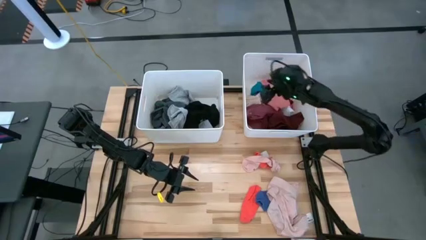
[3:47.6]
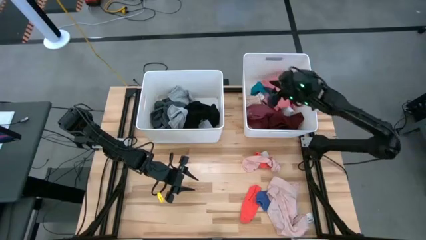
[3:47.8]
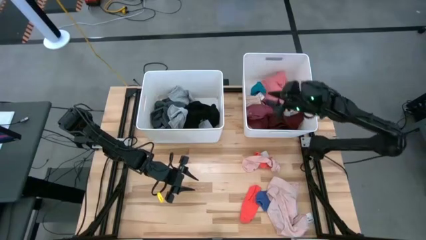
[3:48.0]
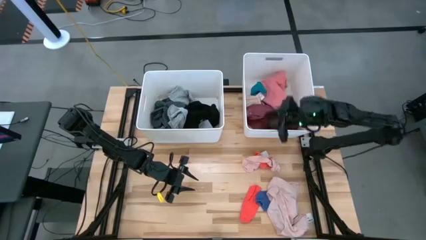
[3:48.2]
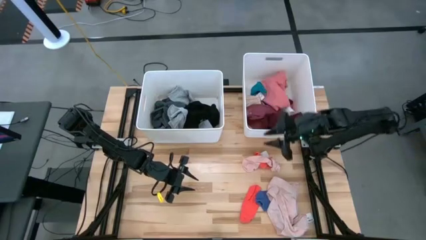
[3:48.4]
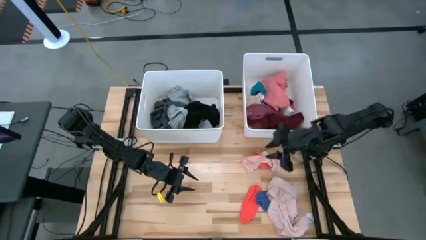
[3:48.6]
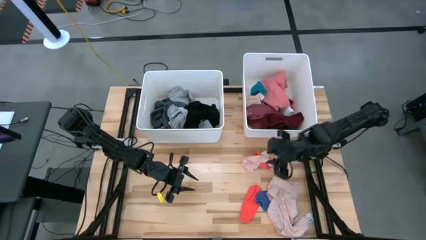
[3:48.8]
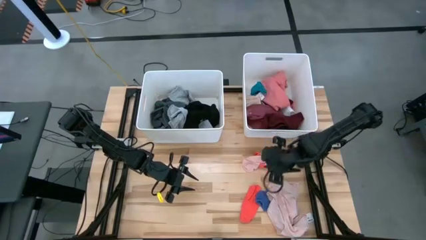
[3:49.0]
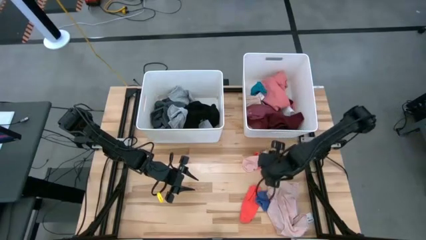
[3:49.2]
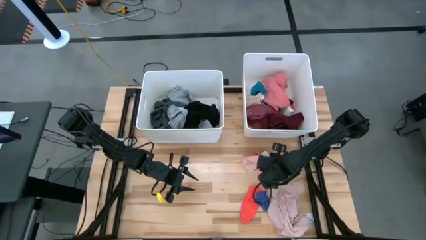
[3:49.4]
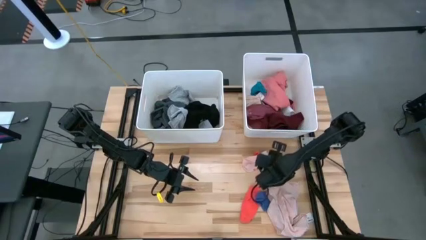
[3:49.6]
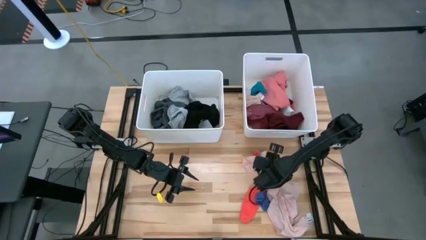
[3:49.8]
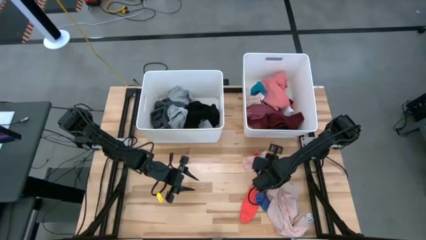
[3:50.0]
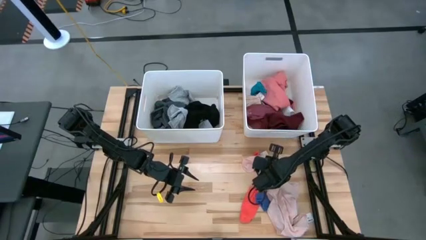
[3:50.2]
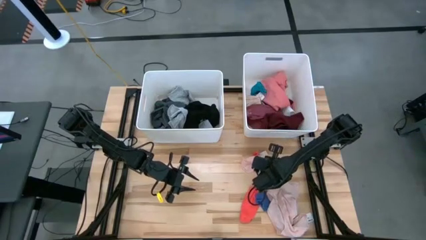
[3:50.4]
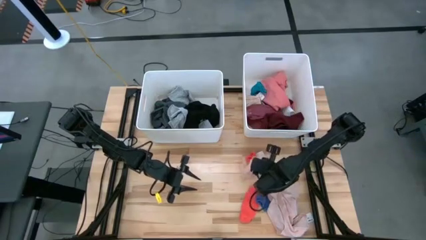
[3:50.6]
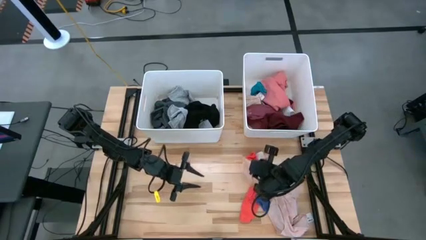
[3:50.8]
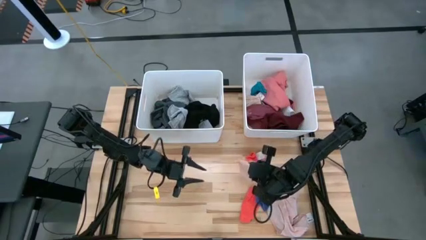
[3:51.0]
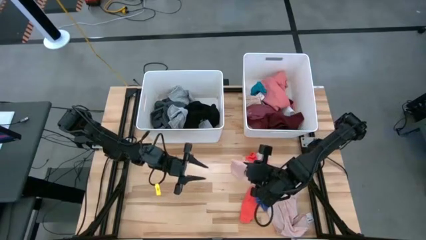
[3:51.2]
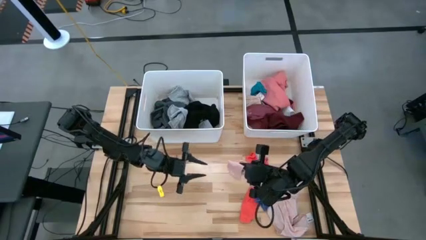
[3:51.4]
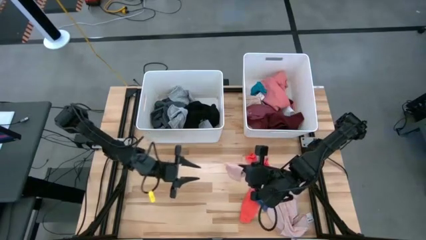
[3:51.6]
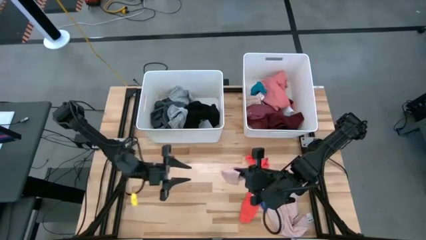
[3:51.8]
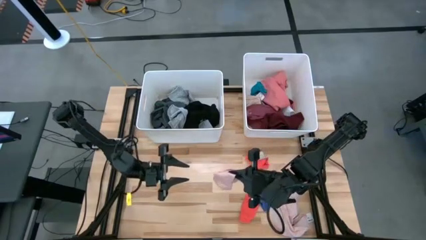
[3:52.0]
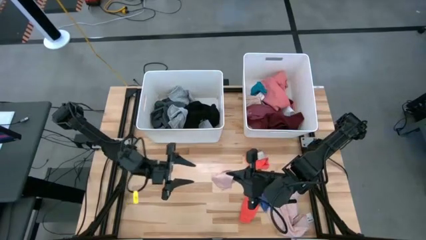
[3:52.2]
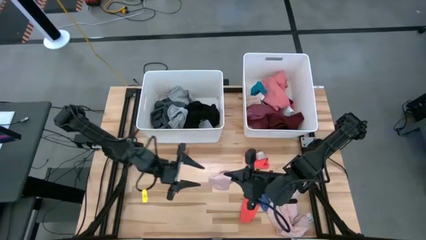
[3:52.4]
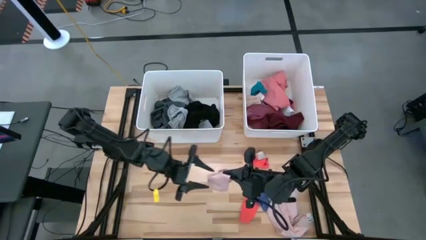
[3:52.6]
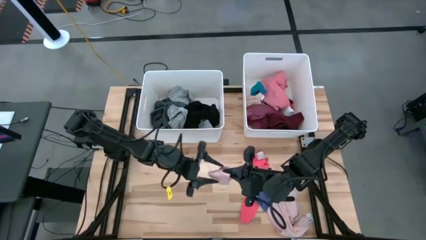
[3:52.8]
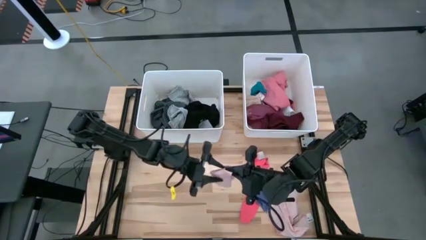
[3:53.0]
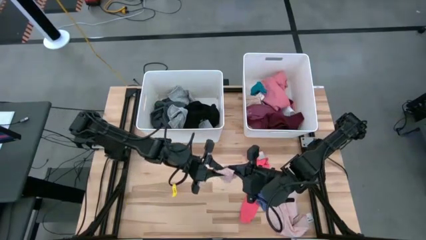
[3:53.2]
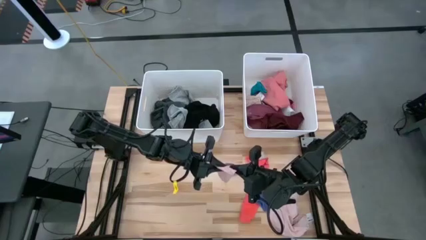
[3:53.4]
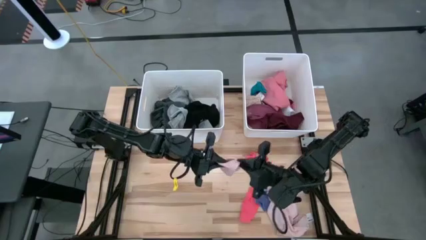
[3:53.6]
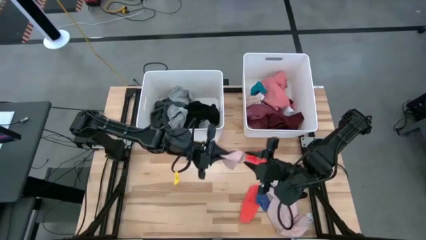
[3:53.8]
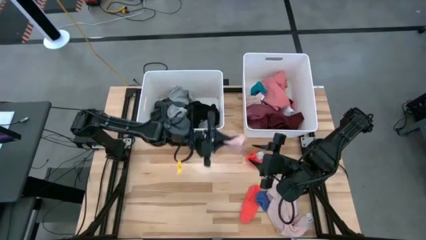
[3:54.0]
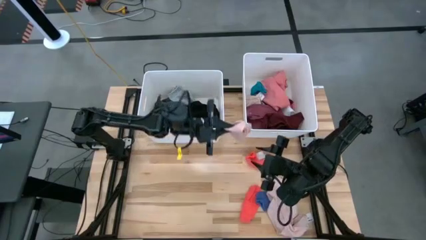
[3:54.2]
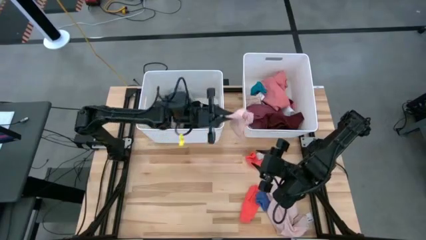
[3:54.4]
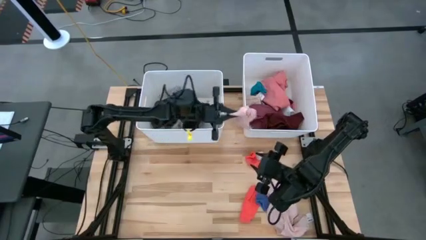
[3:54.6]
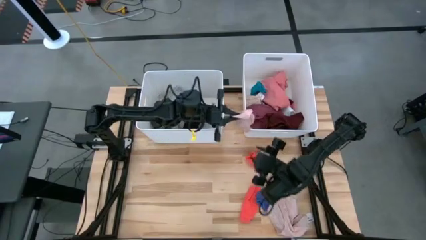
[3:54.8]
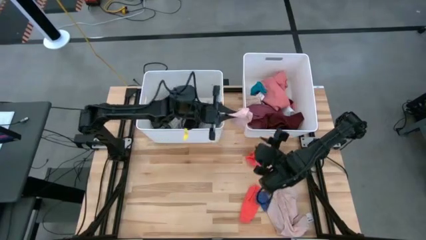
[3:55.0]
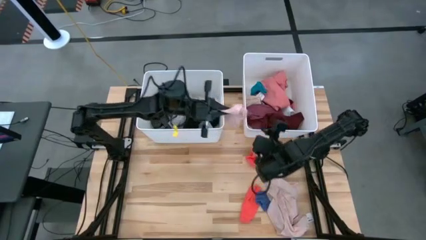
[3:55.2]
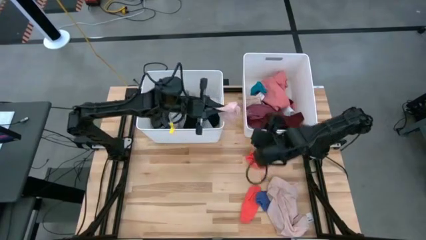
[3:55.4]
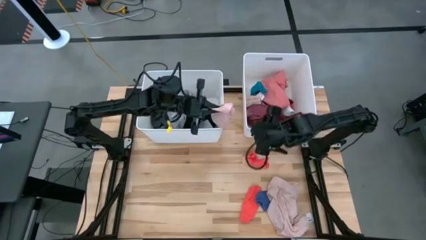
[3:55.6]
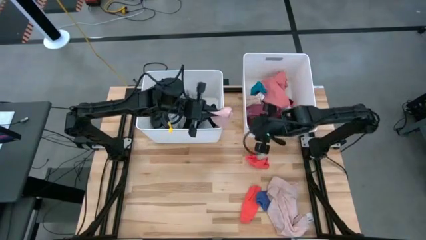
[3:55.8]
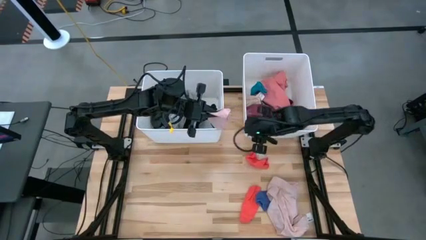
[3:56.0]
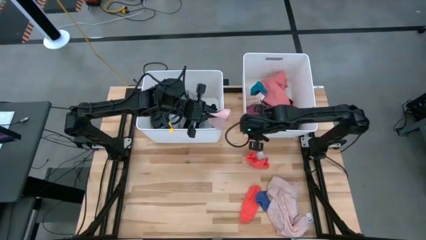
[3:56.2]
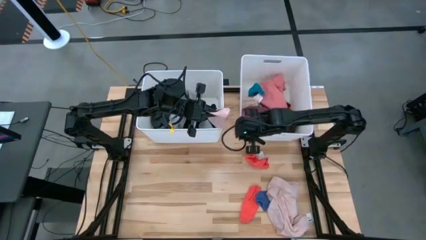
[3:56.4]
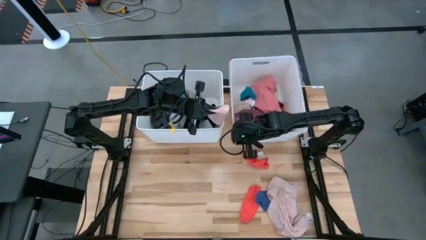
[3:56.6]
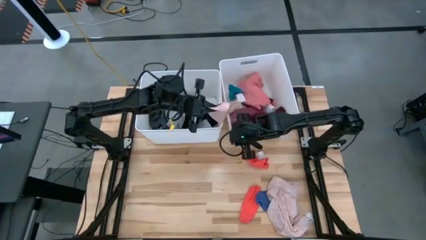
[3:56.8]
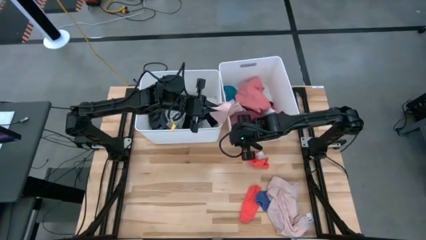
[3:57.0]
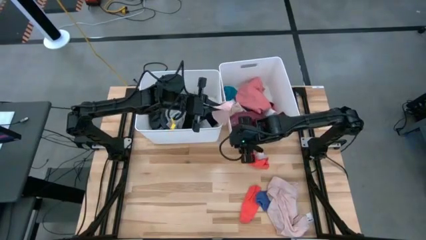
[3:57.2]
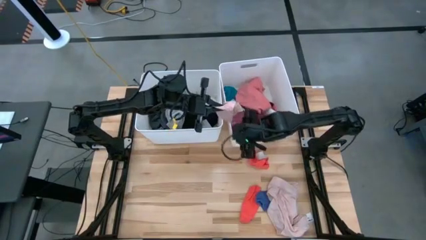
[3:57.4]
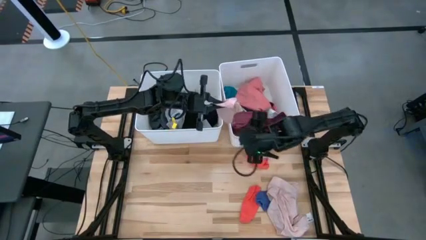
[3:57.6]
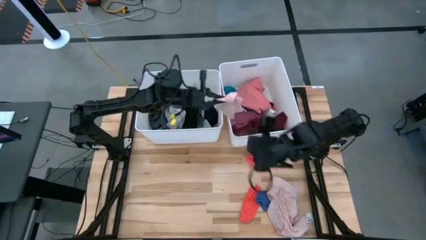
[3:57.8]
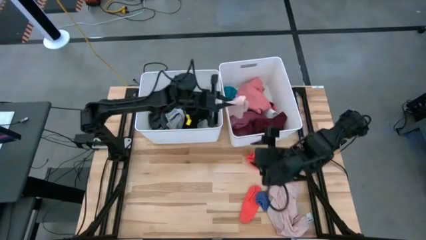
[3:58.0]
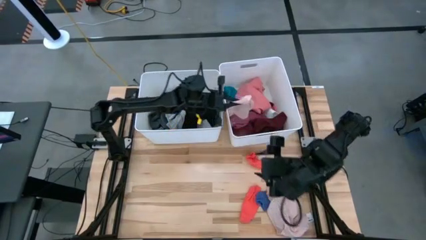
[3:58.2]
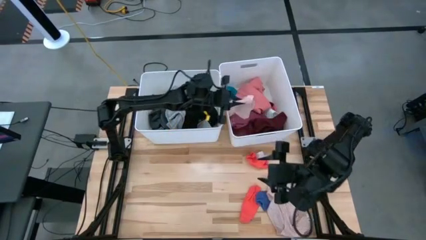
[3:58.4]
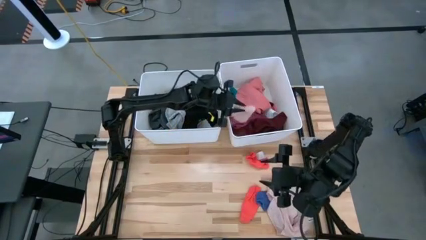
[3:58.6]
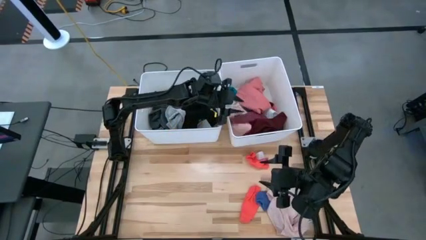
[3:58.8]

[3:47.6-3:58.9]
Task: Sort clothes
Put the light pink sock into the right white laundry organizer
